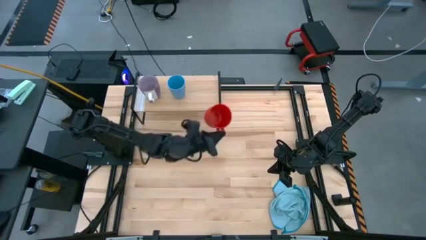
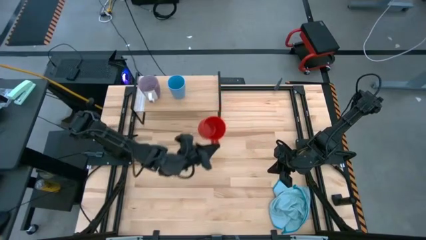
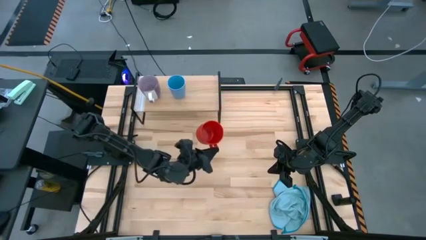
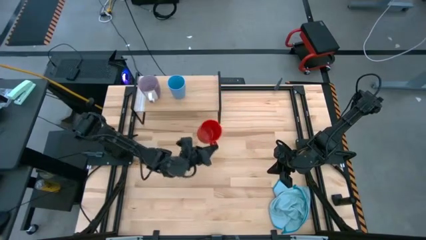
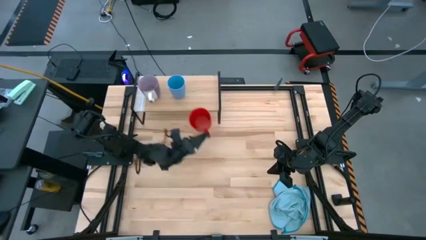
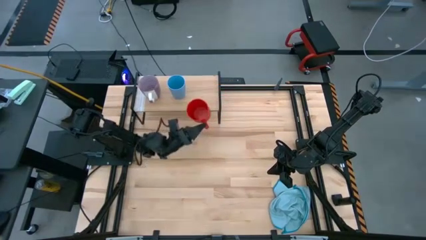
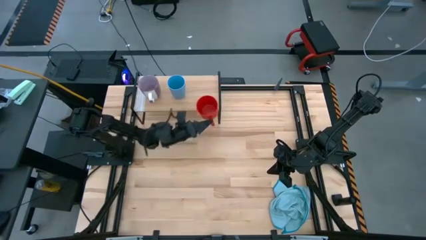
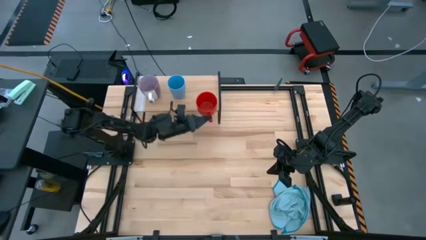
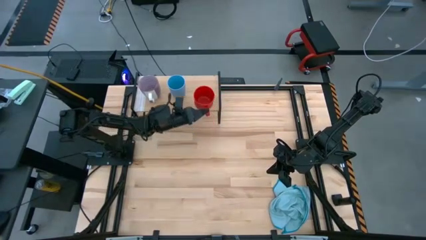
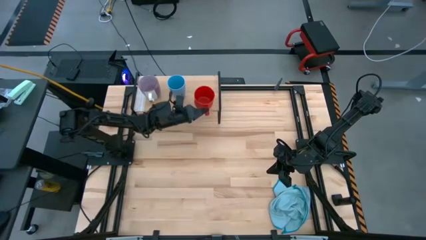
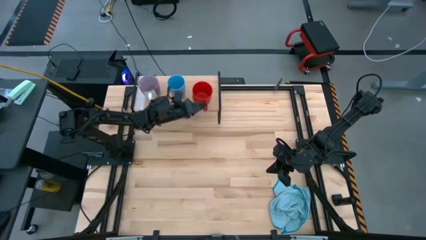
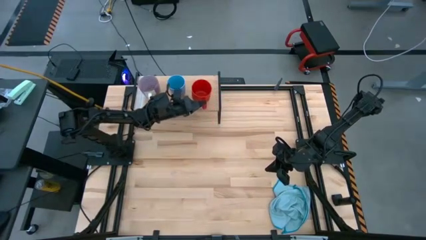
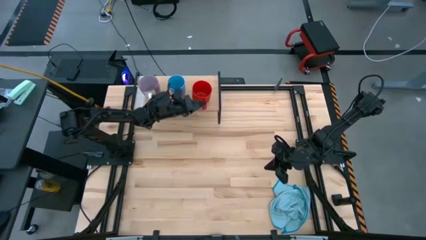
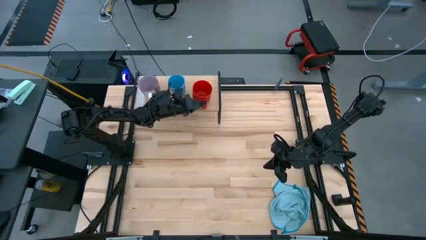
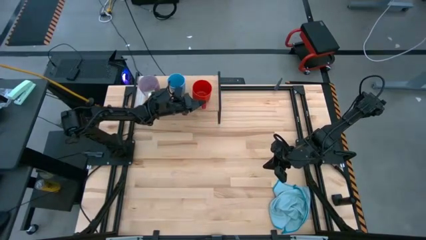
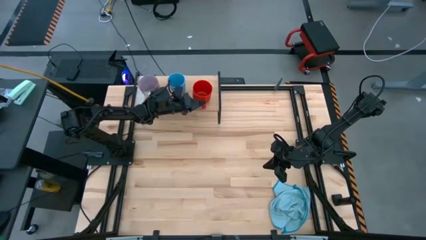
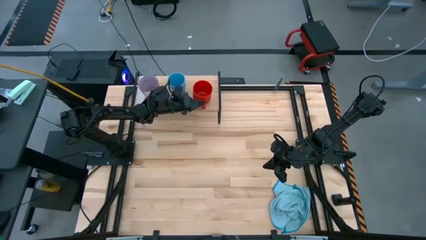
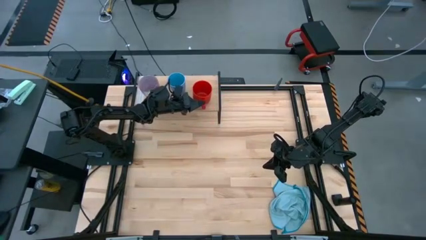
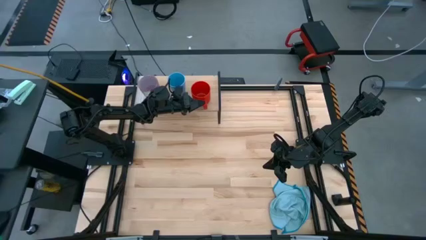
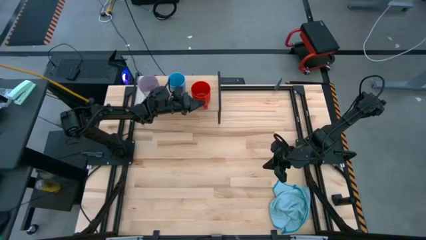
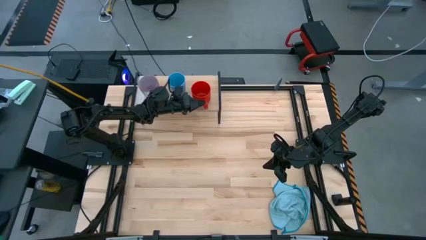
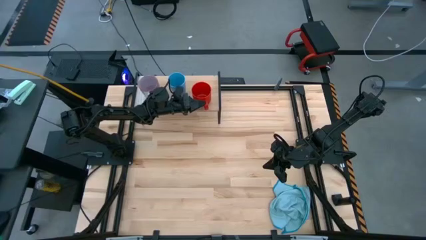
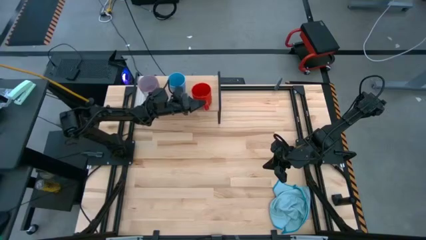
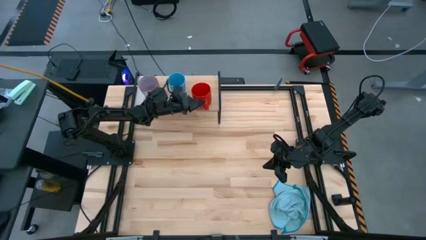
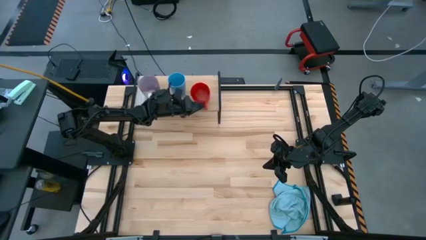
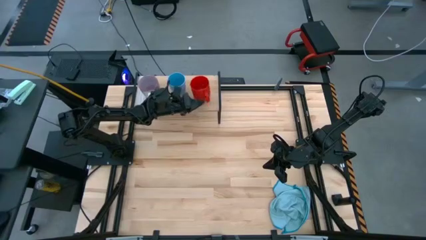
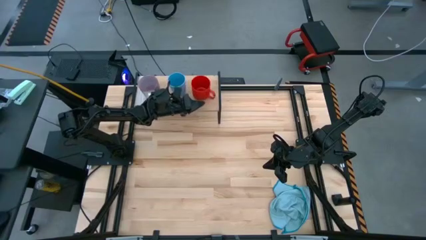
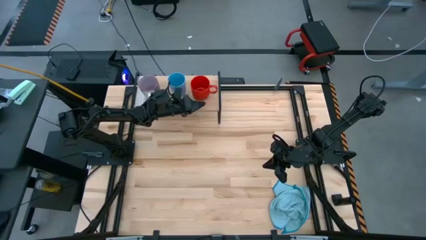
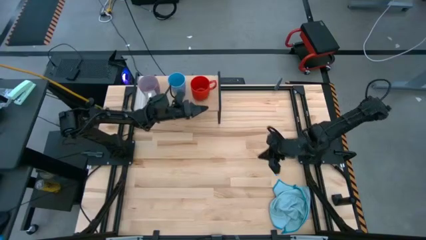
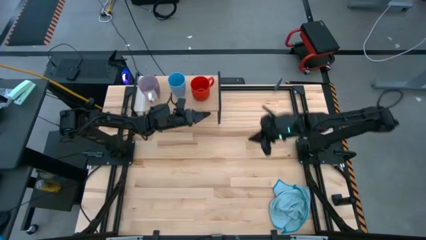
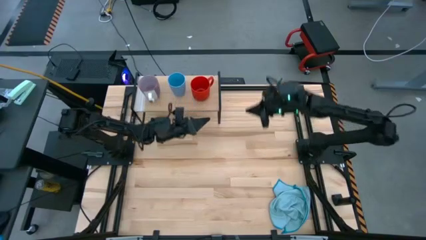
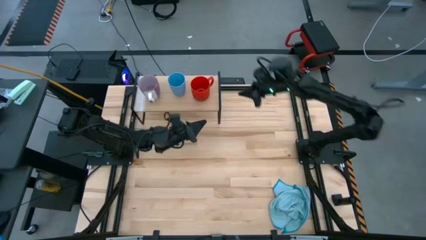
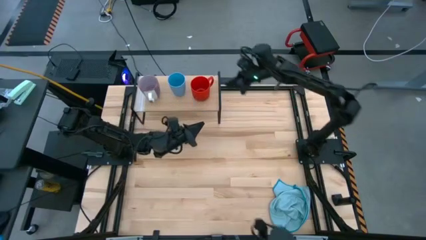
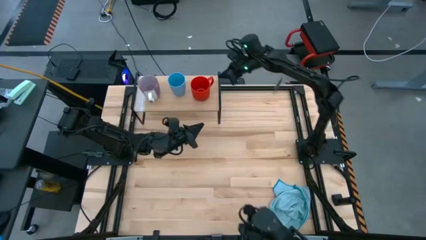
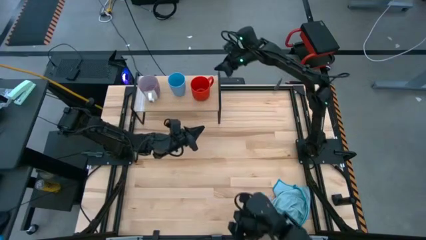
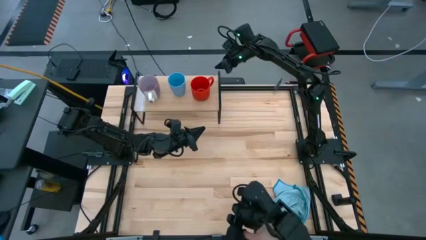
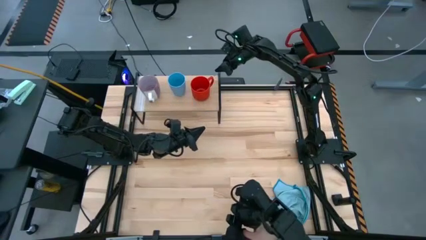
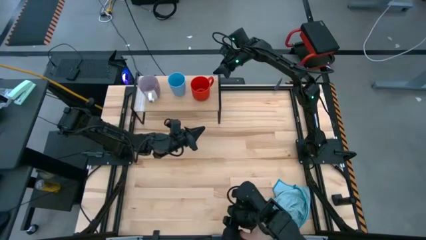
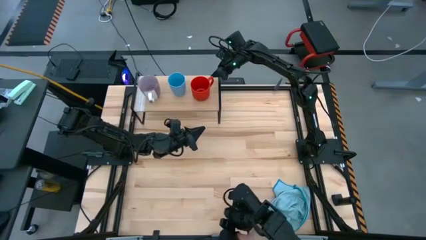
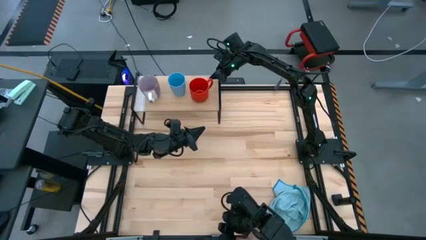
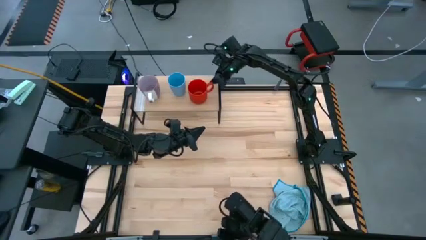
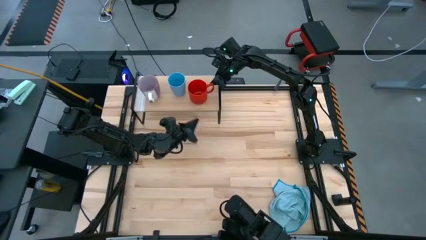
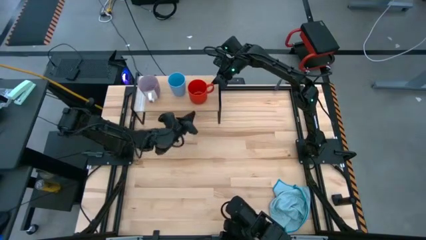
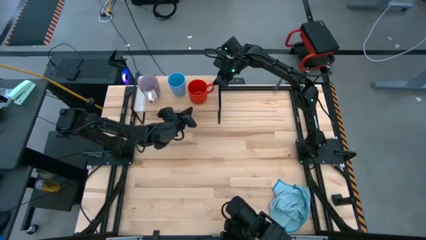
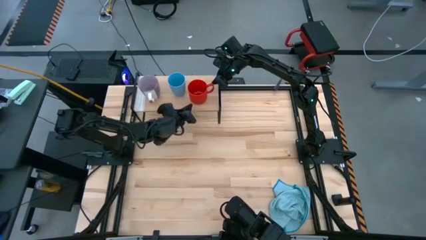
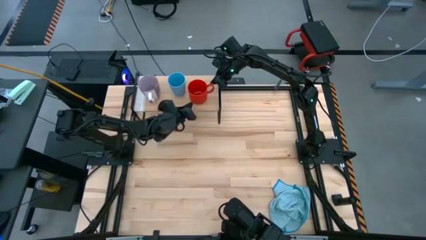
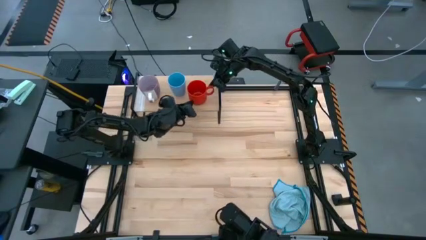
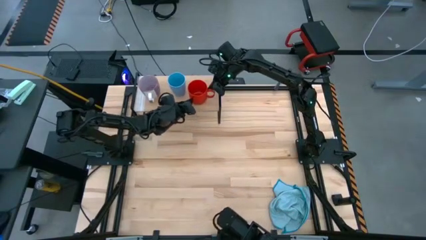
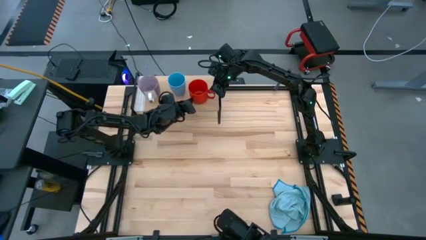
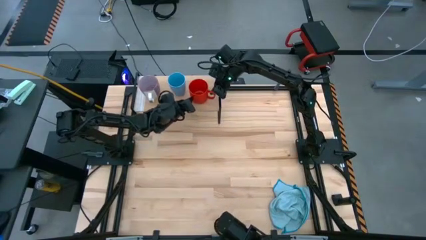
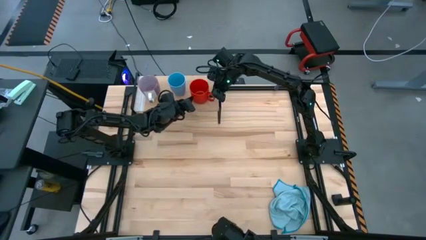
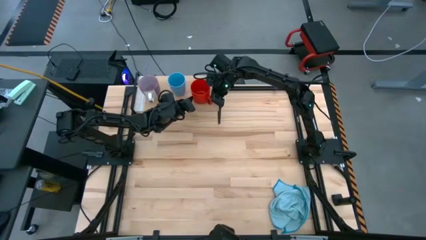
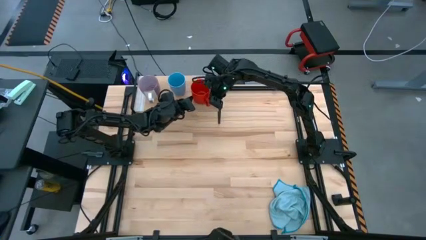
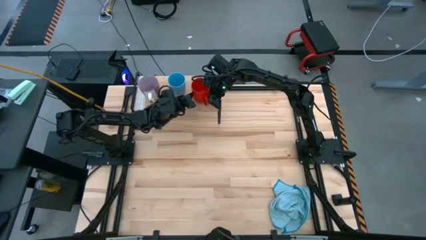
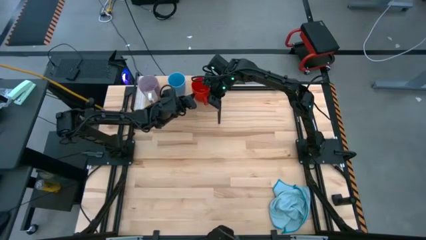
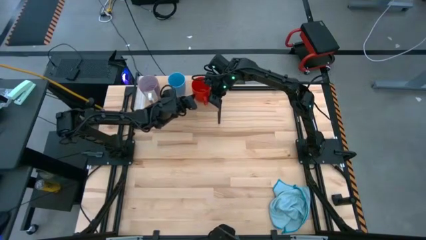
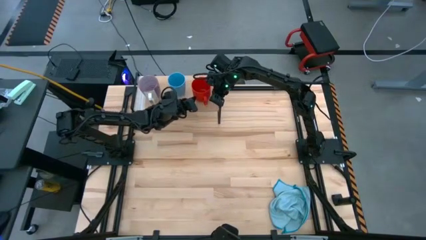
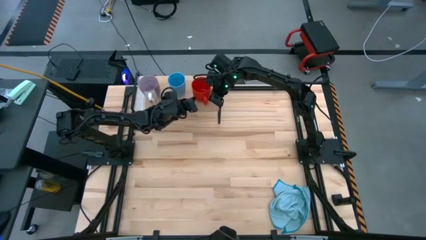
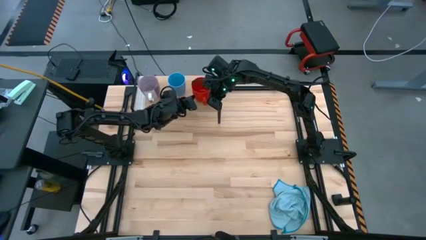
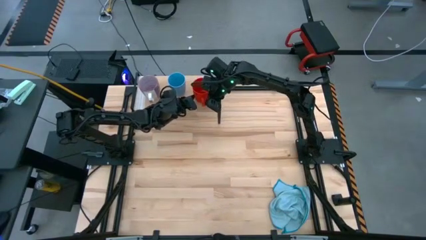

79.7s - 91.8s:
Task: Stack small to large cups/mugs on shelf
Put the red mug on the shelf
